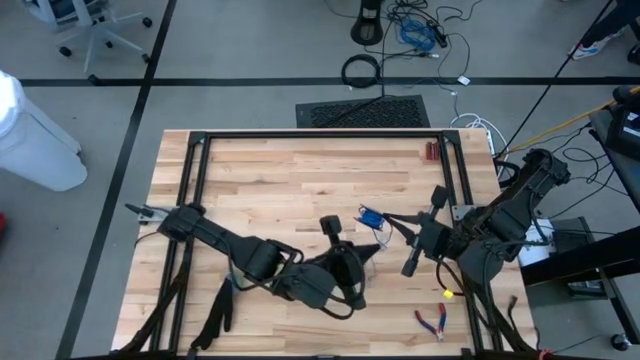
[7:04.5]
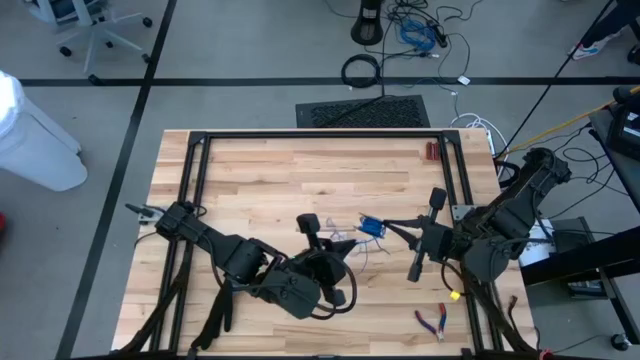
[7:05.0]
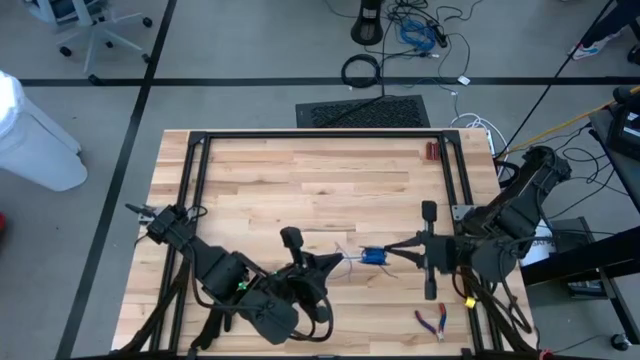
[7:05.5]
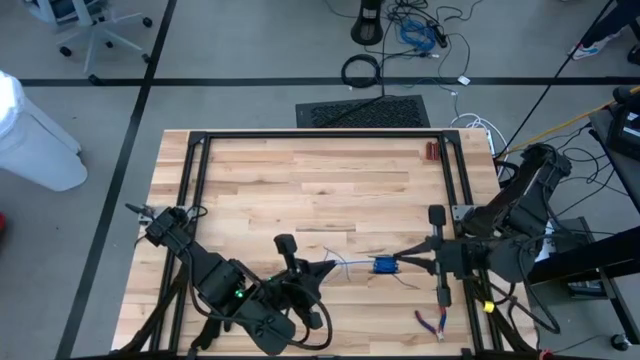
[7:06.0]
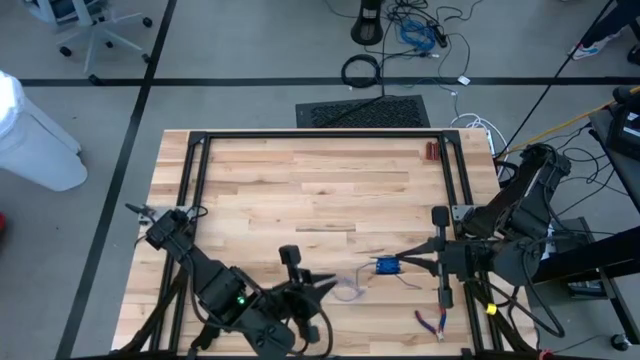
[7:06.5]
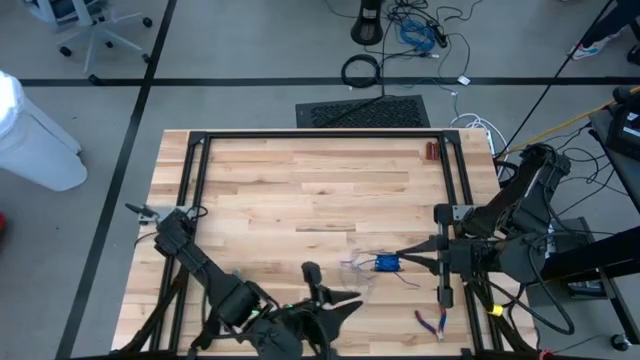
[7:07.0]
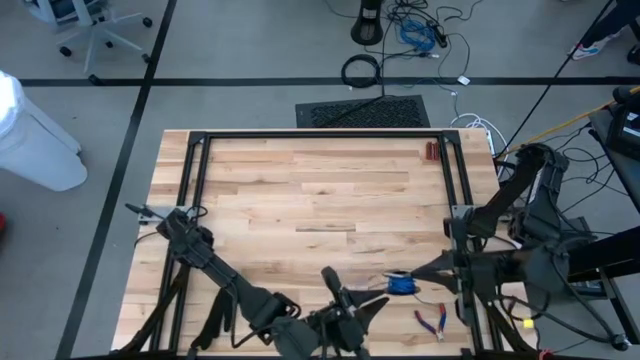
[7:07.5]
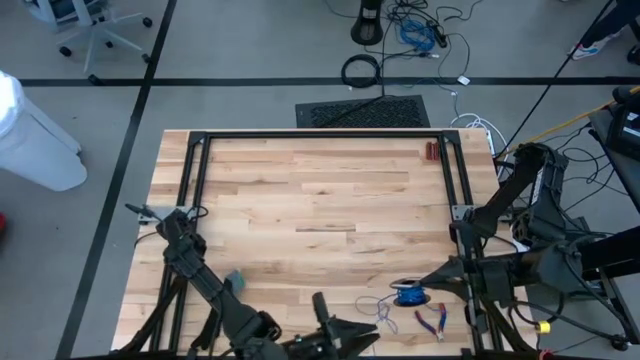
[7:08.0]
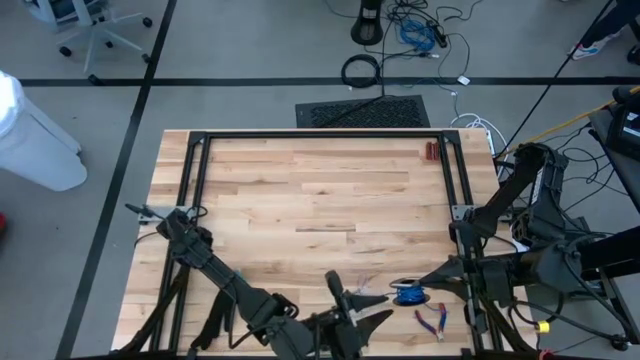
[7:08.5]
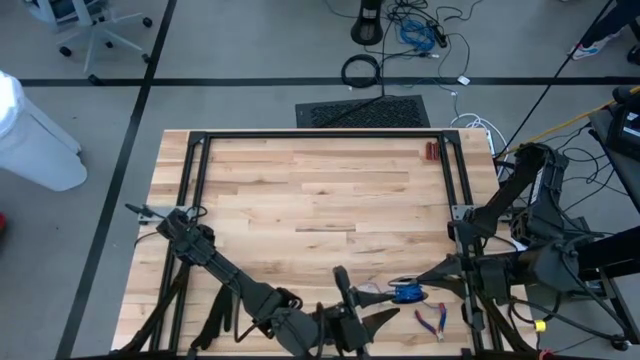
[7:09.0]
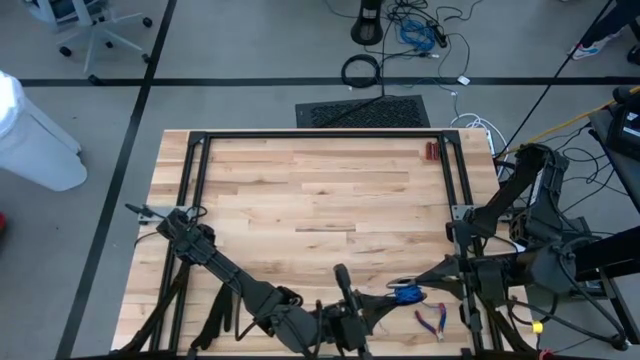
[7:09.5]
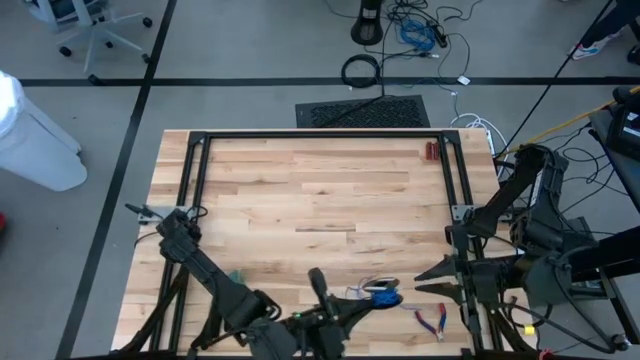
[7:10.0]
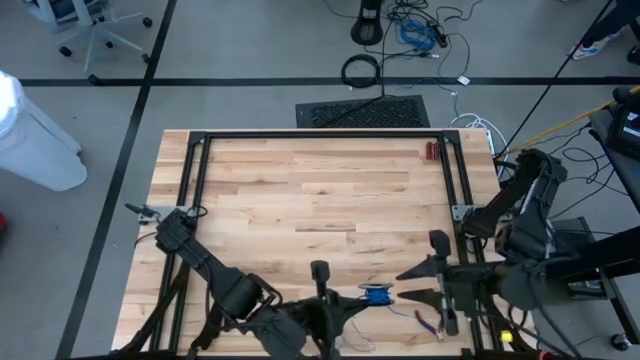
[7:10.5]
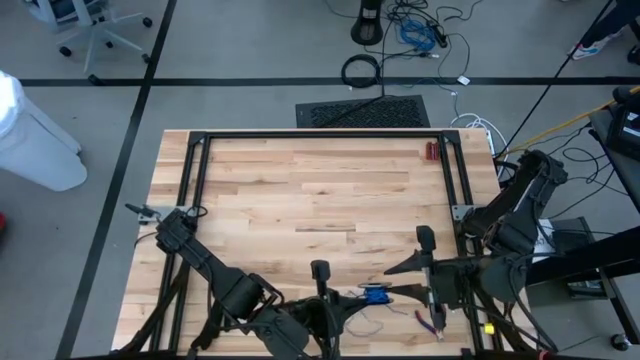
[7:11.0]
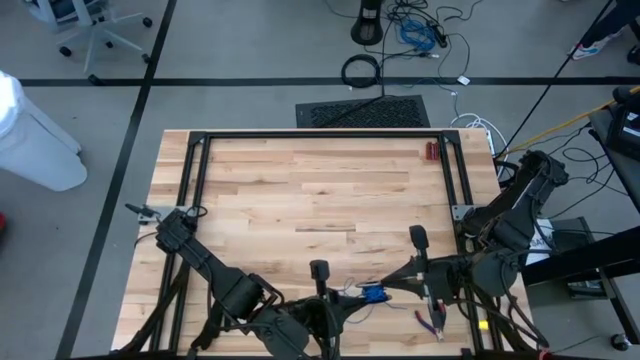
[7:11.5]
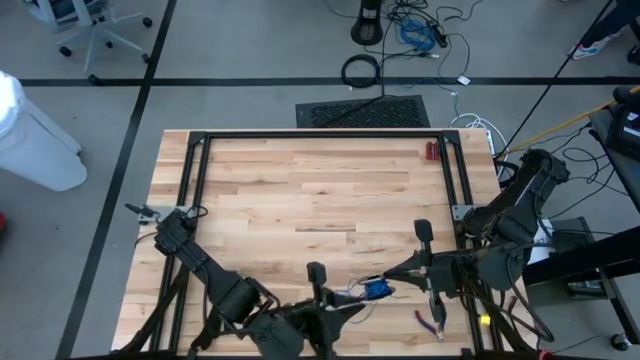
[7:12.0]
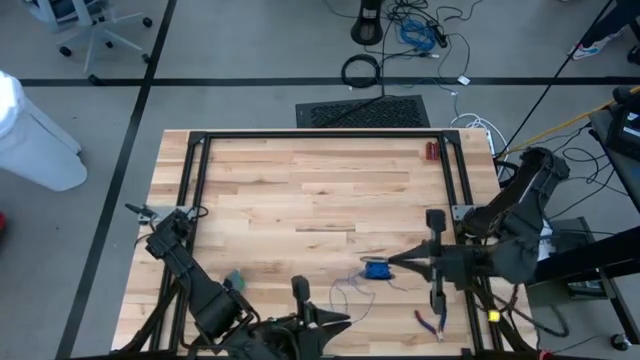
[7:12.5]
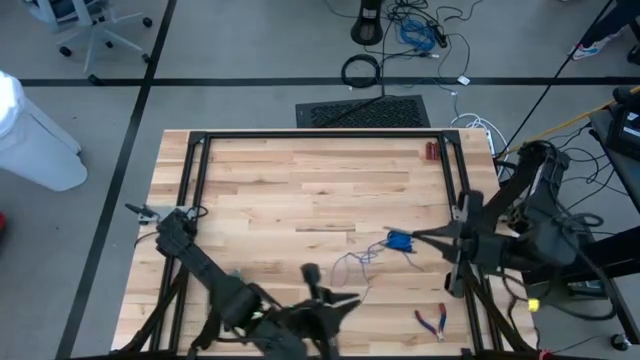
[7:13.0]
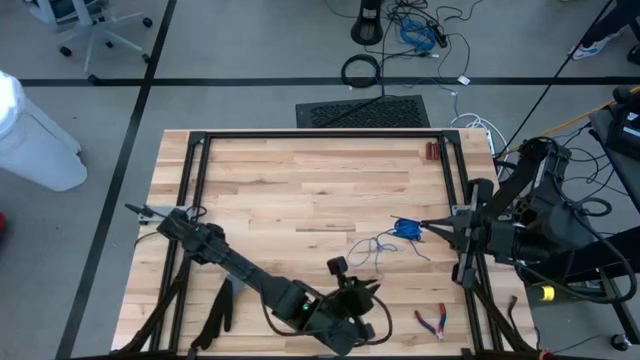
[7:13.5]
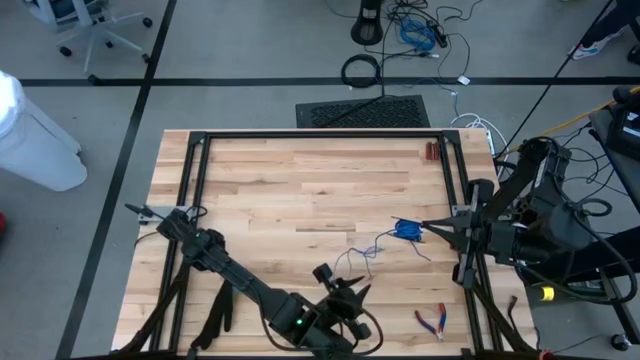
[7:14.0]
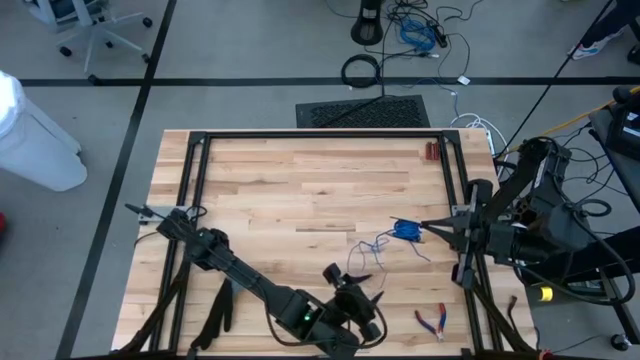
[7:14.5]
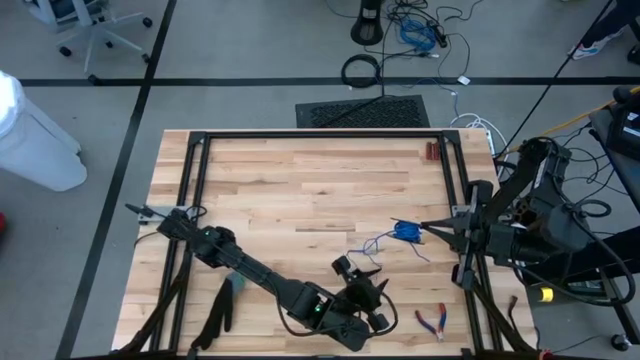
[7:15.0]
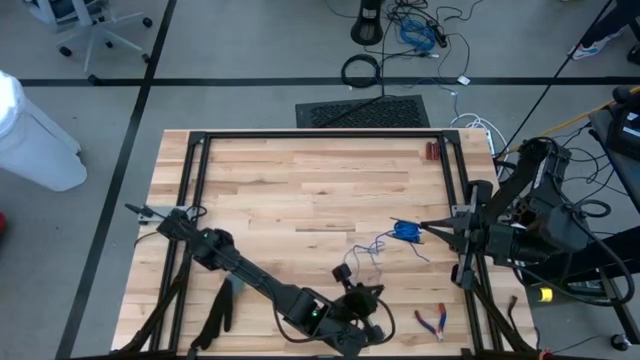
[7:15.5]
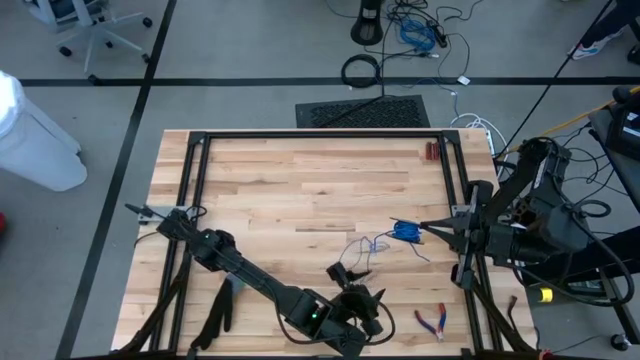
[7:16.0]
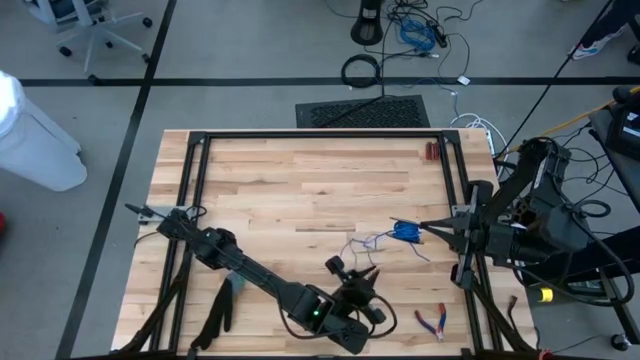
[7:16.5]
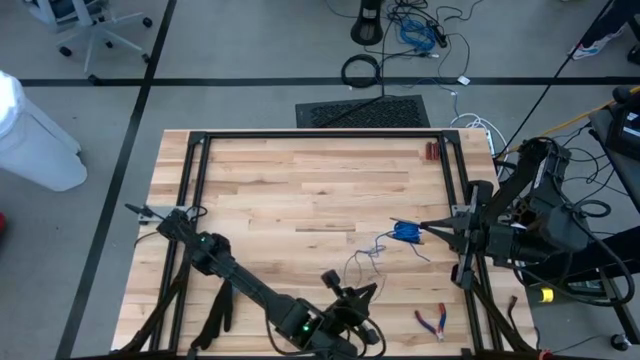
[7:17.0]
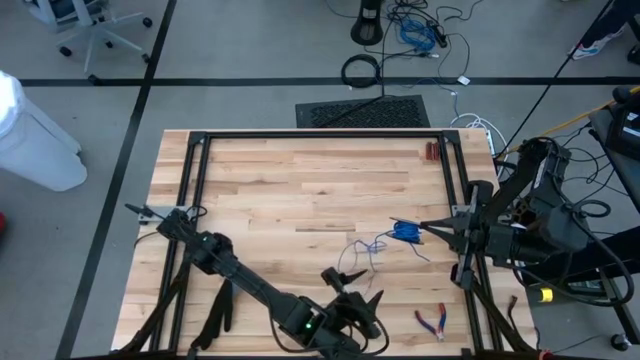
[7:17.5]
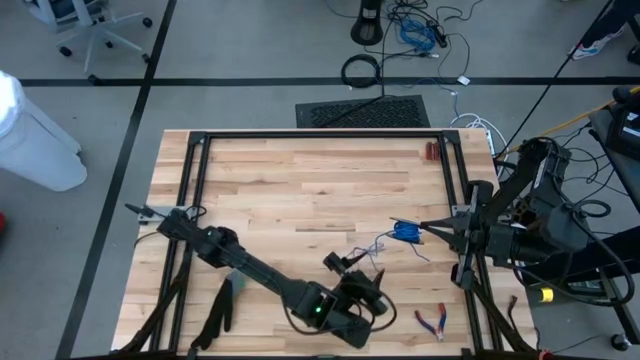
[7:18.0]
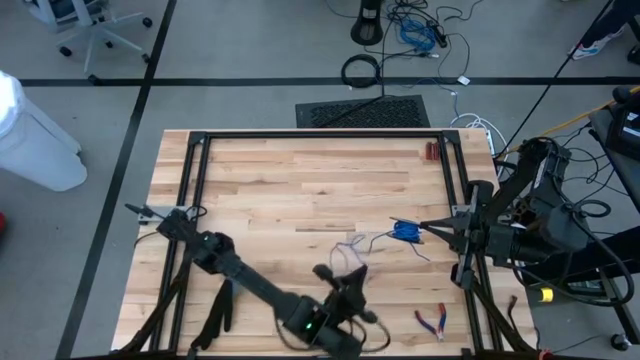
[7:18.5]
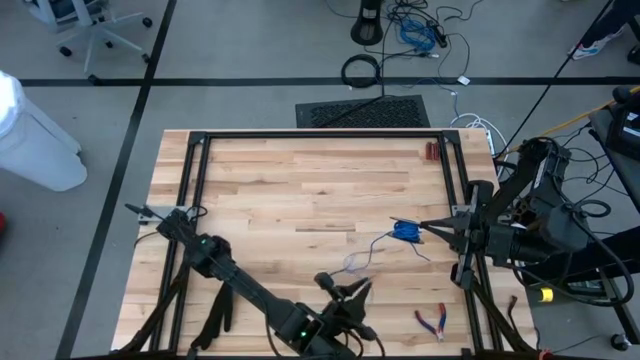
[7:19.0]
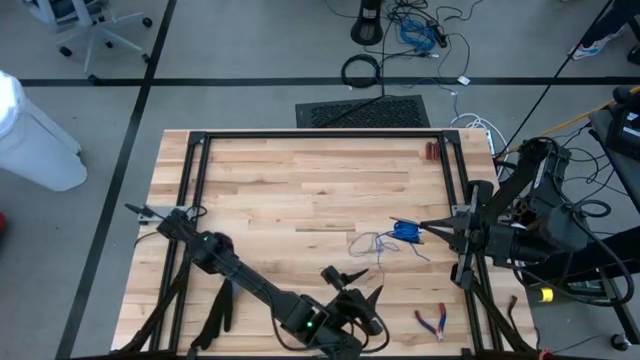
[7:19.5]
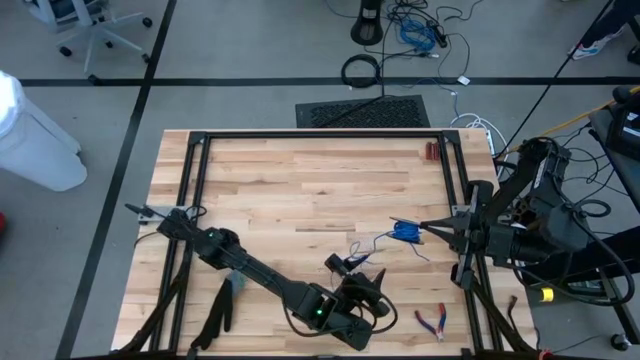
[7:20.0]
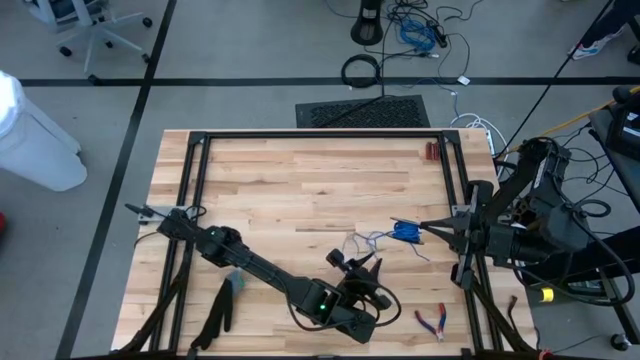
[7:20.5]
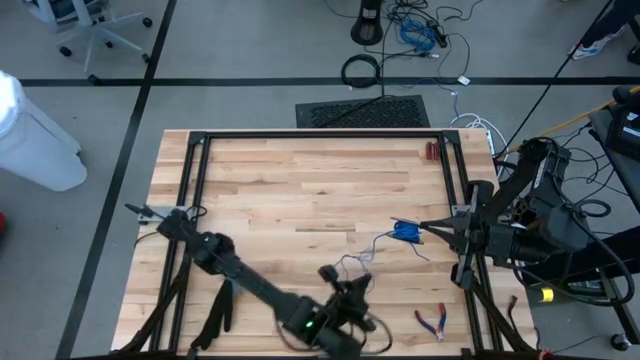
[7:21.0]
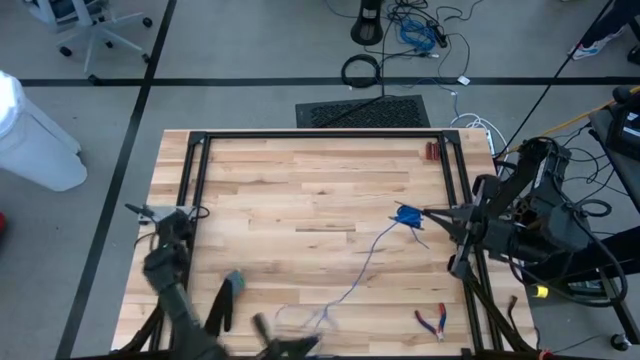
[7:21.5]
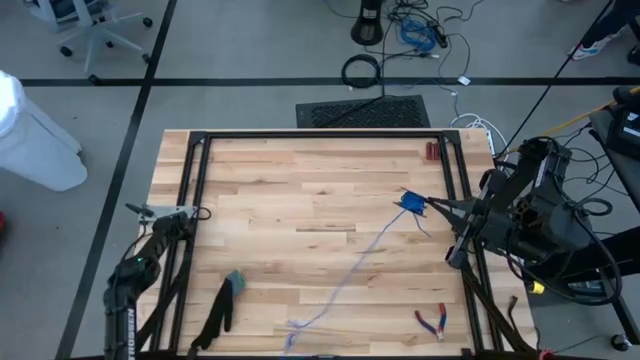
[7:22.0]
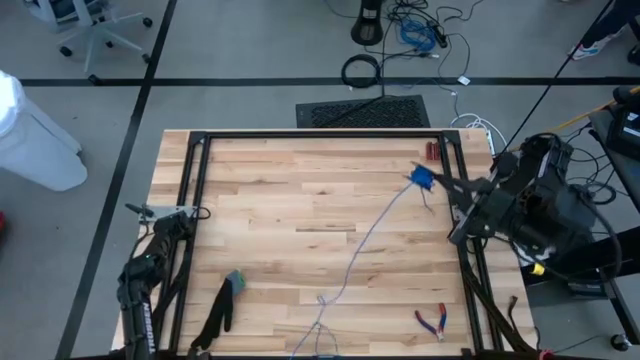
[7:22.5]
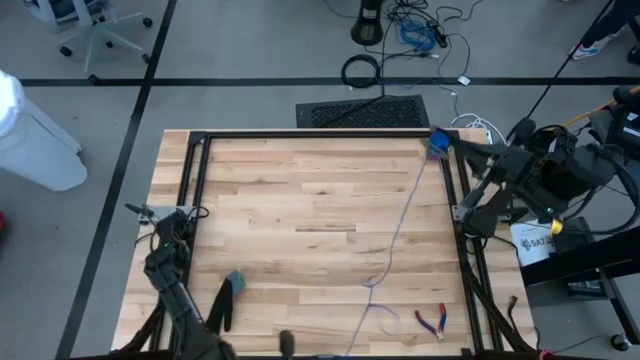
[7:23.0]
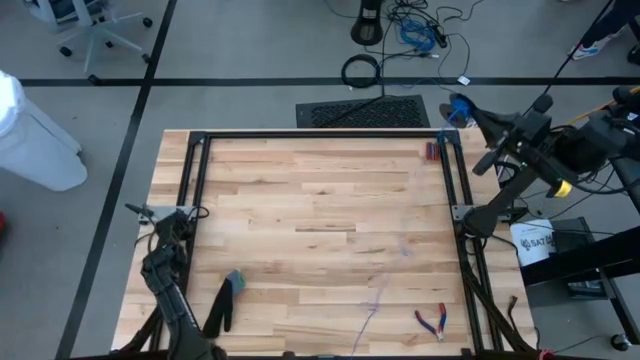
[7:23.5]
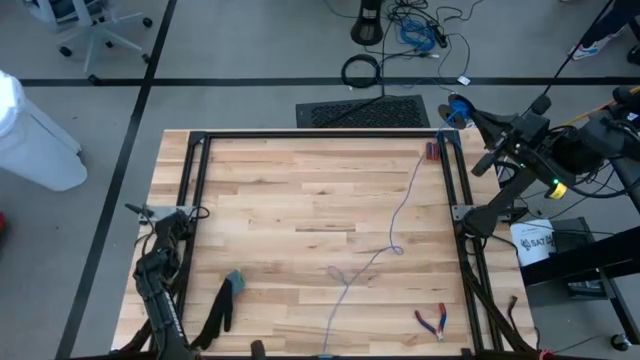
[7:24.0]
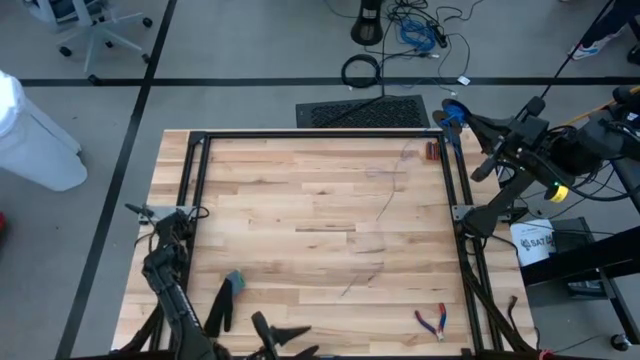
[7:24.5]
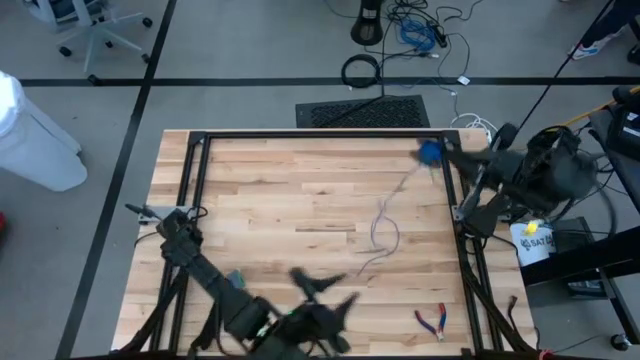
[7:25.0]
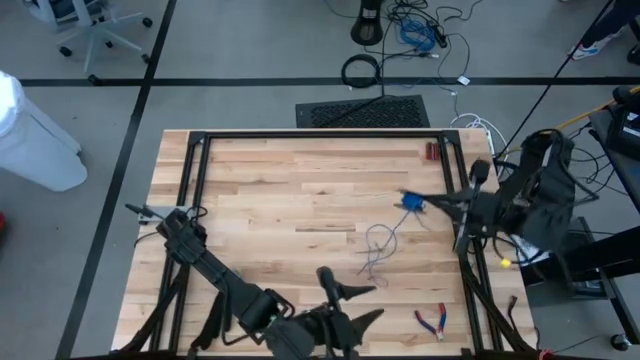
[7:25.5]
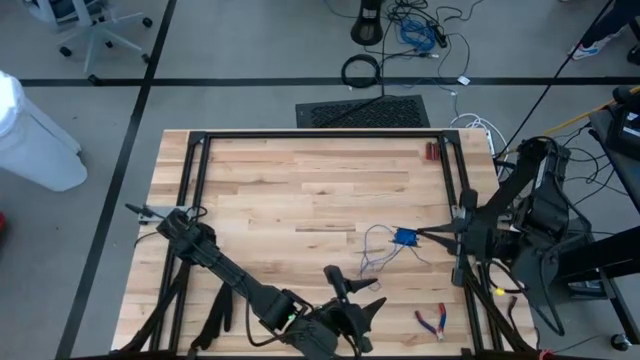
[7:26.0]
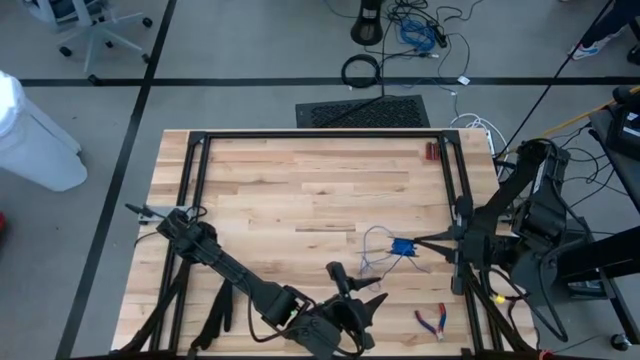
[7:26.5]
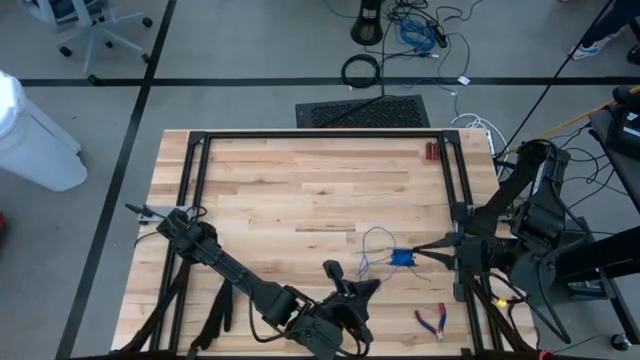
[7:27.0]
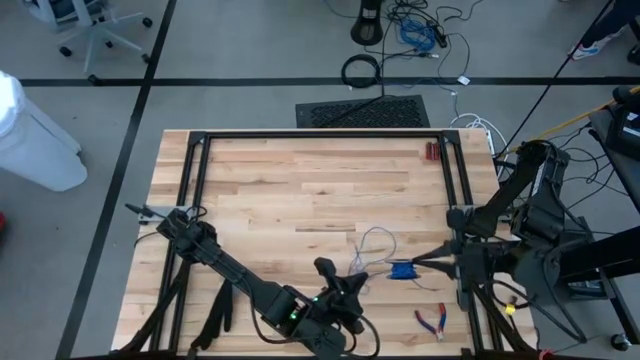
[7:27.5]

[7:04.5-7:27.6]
Task: Coil cords
Coil the blue wire onto the black spool
